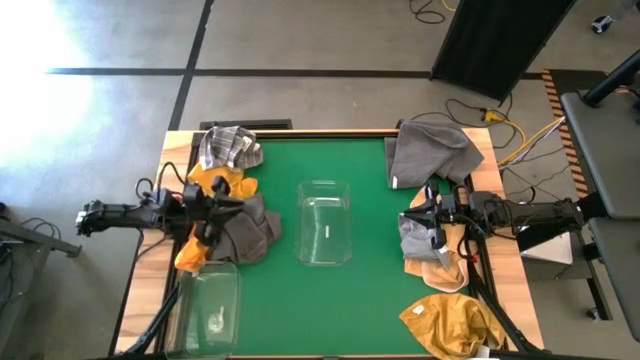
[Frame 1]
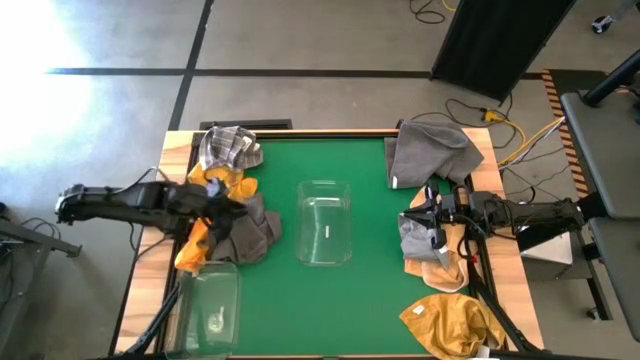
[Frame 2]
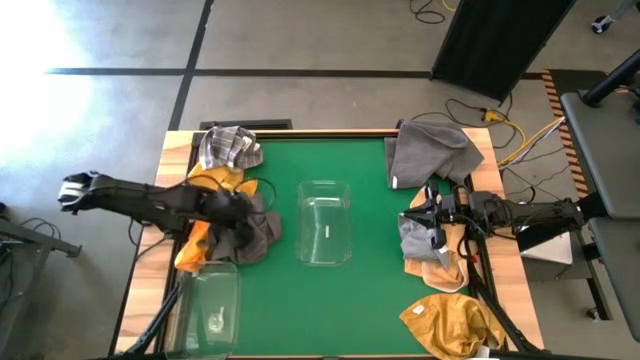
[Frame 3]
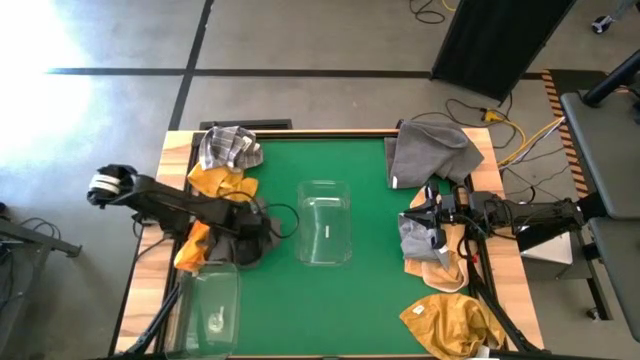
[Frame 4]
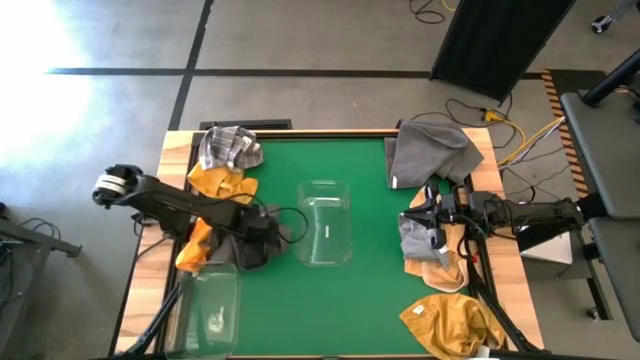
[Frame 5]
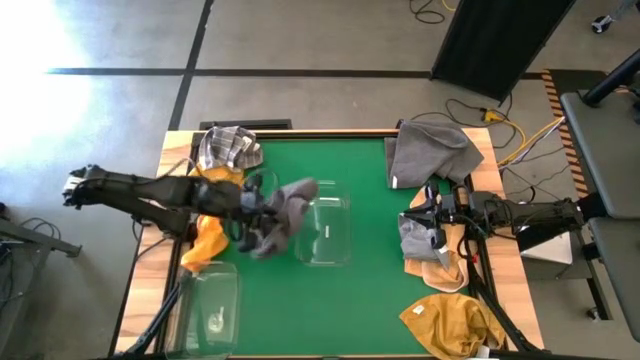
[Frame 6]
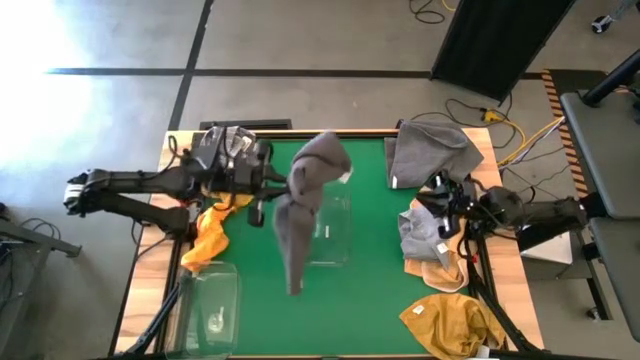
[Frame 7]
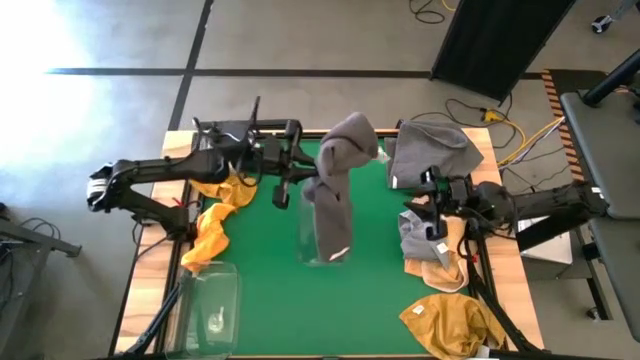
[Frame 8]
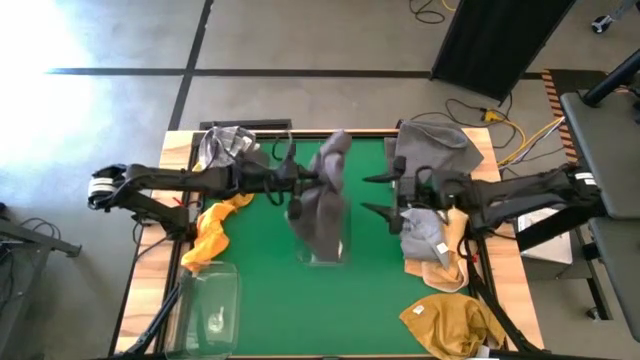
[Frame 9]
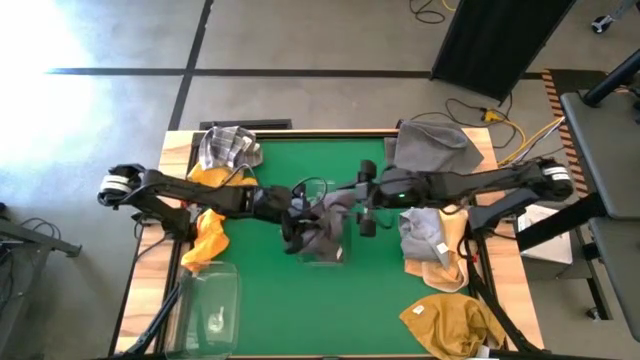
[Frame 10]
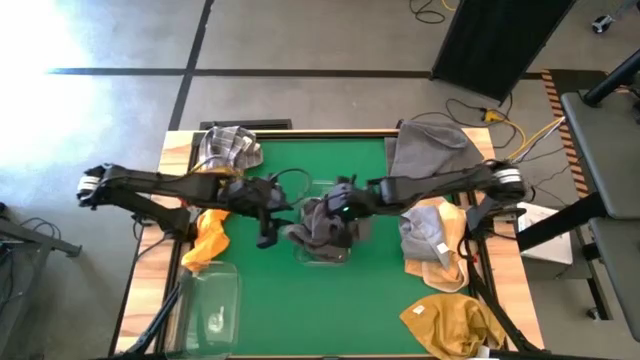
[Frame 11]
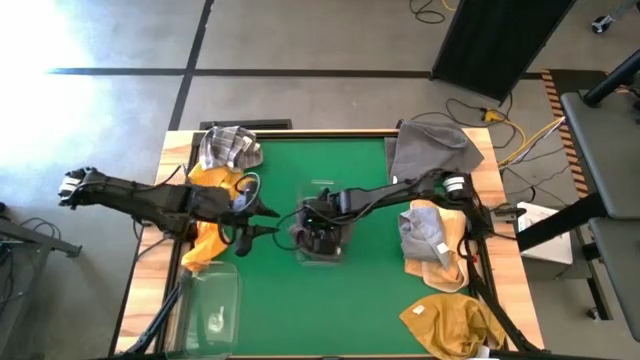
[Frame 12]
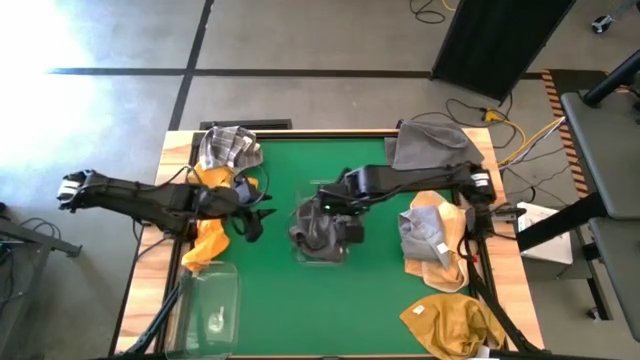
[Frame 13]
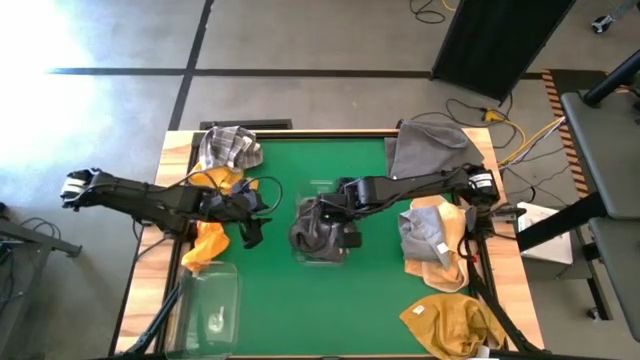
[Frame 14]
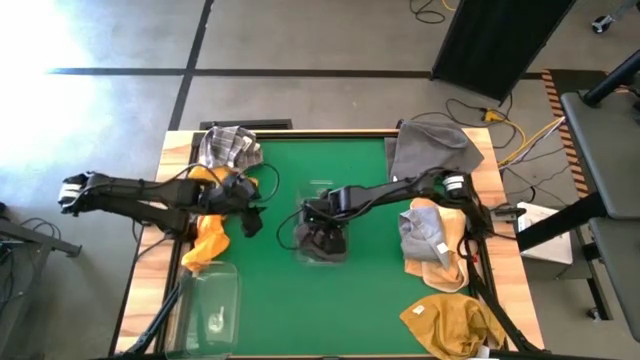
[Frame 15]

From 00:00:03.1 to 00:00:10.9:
Task: Sort towels by color in basket
Put the bottom gray towel into the top transparent bin

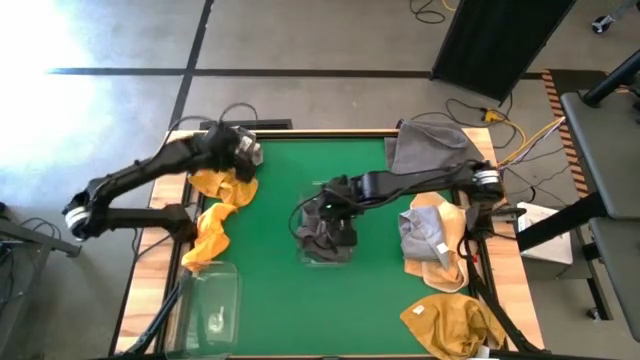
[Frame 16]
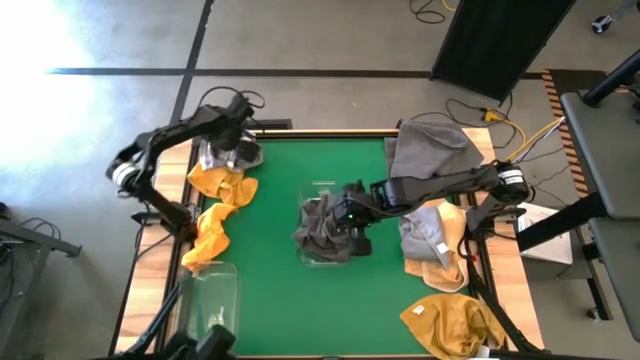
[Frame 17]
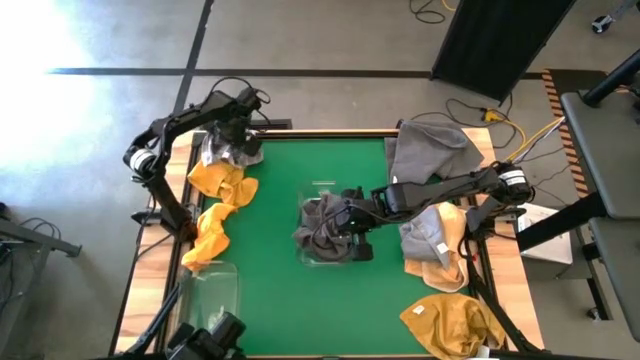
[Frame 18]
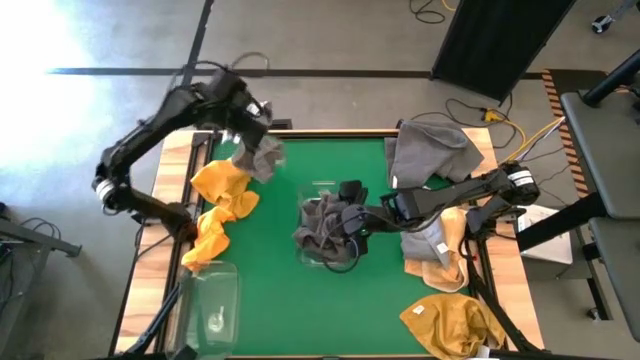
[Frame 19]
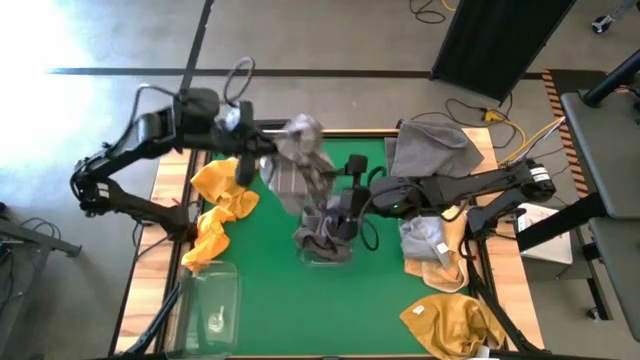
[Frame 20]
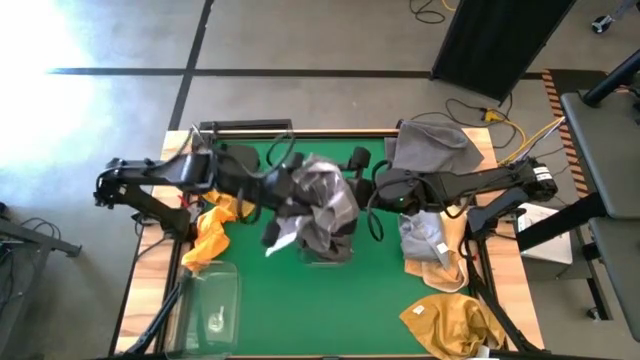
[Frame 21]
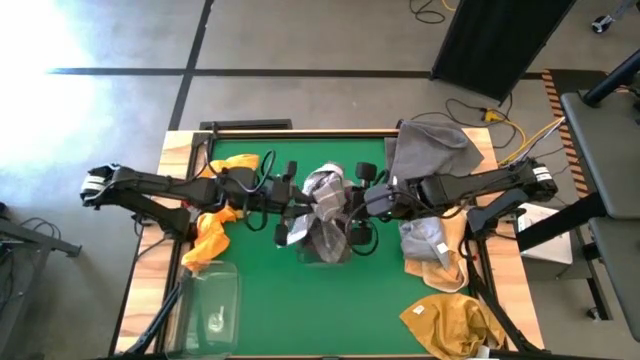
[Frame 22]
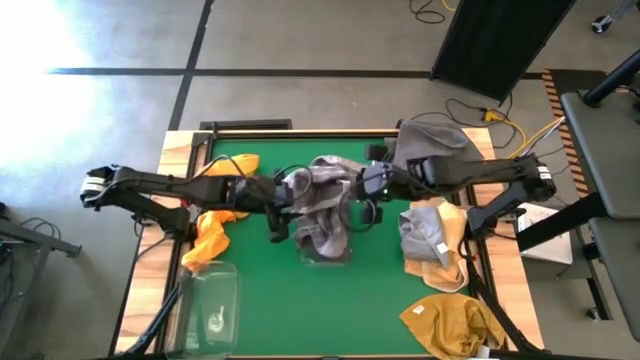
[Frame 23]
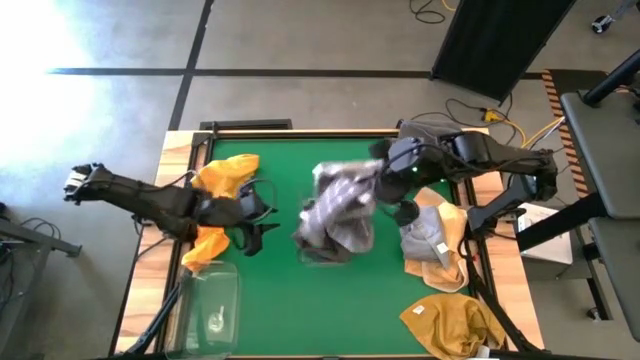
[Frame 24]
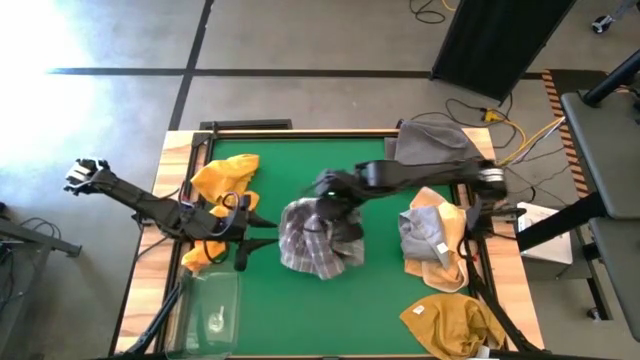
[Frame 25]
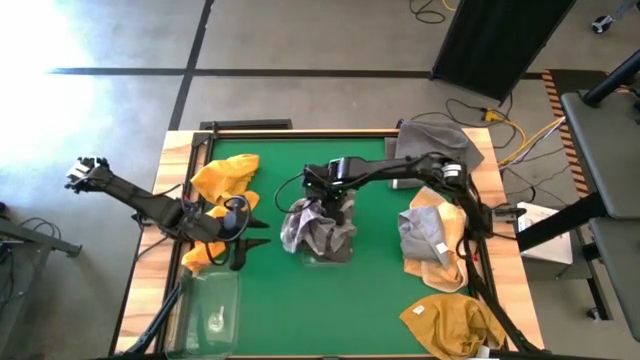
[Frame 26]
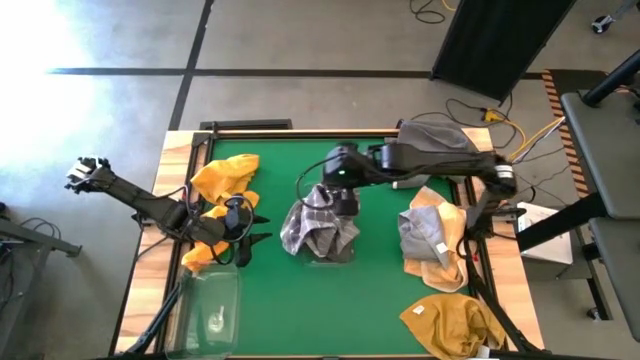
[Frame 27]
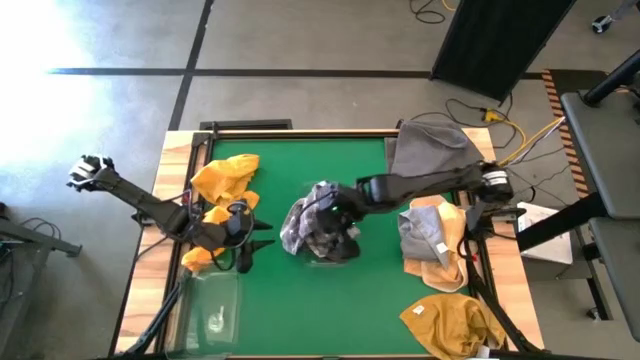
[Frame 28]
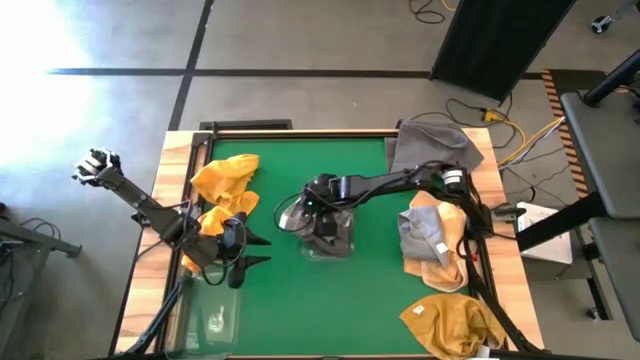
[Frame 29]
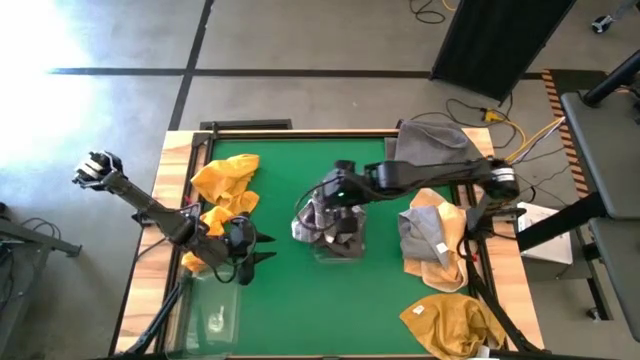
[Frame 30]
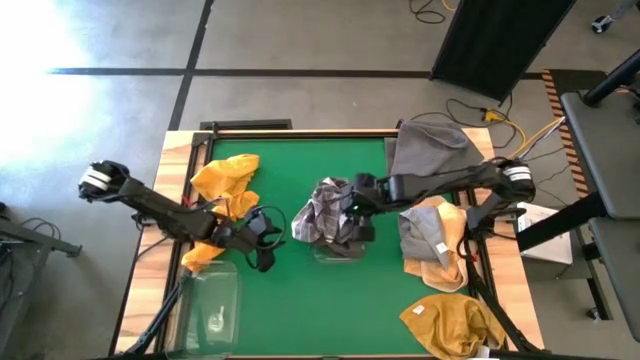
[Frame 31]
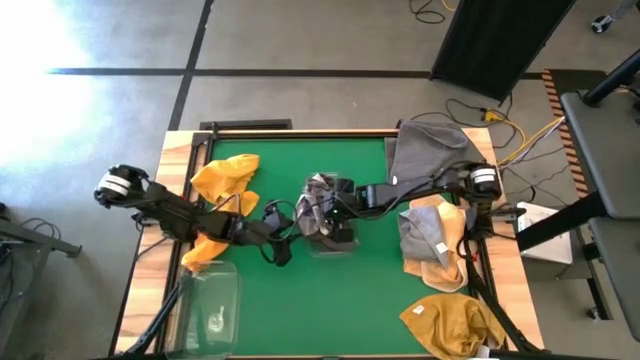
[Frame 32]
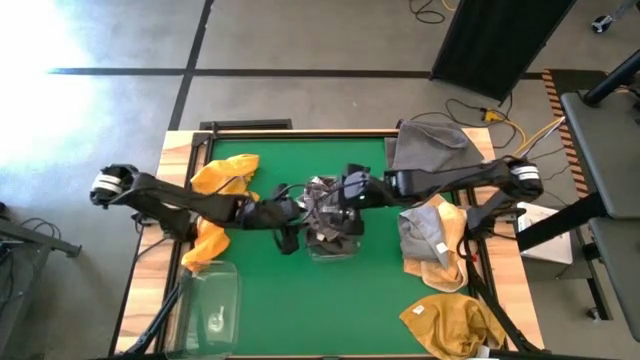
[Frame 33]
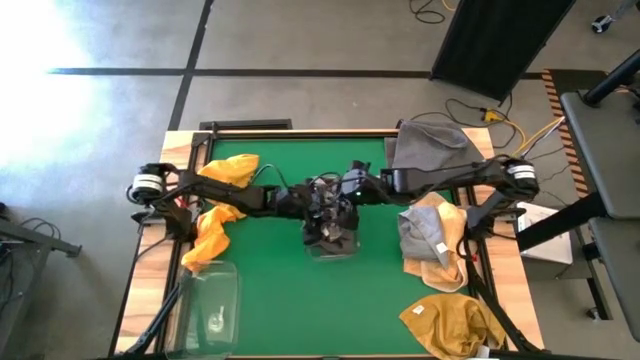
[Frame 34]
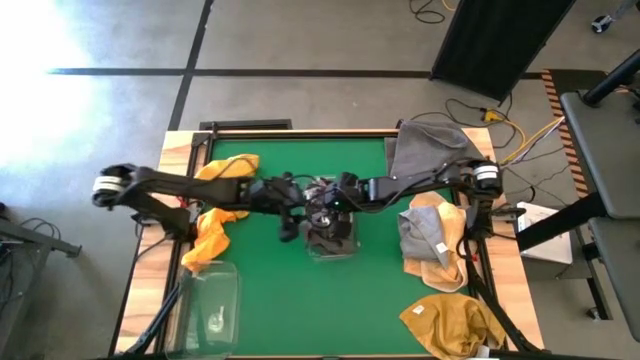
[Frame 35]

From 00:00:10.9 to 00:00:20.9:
Put the gray checkered towel into the top transparent bin

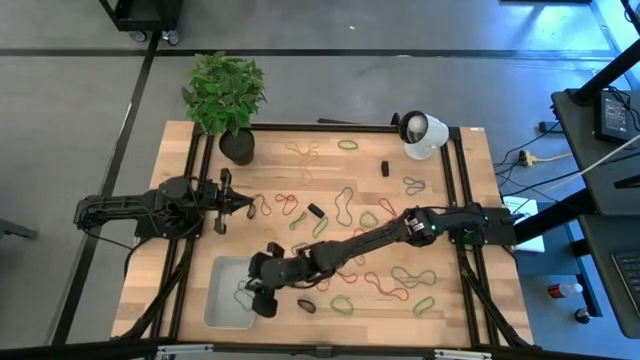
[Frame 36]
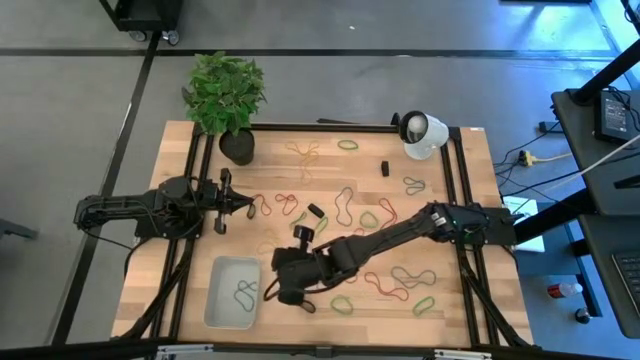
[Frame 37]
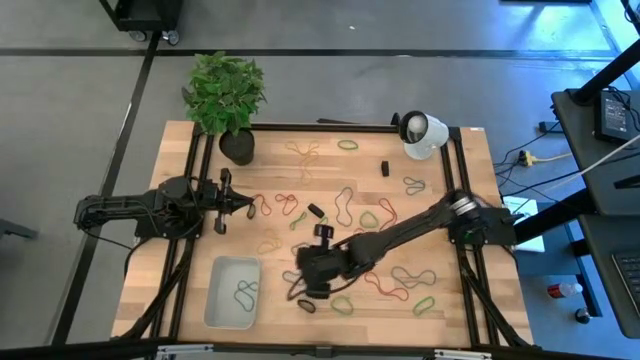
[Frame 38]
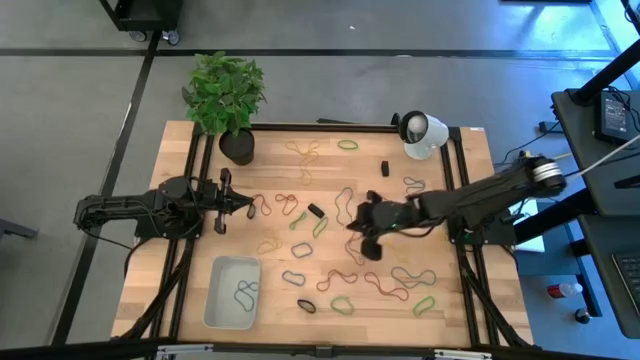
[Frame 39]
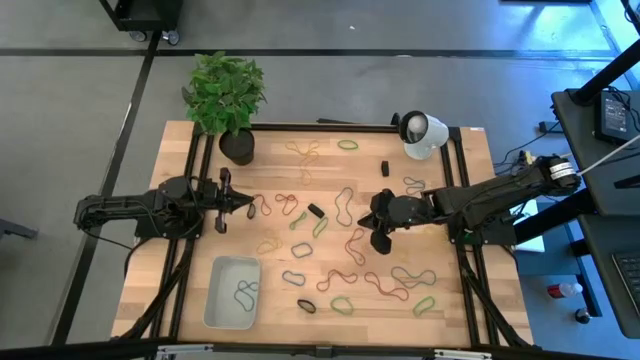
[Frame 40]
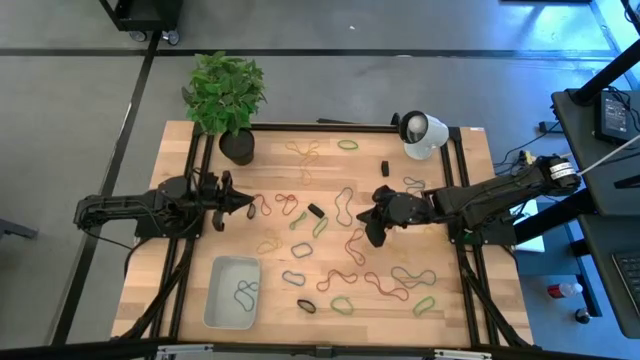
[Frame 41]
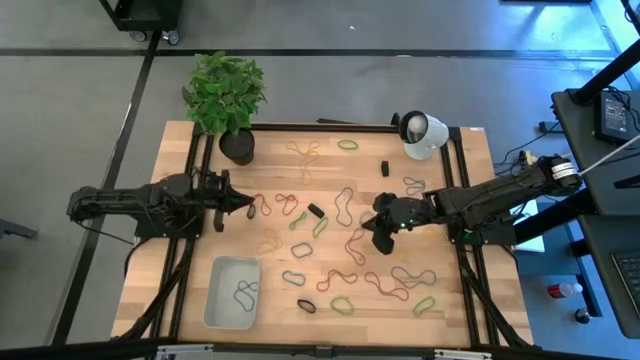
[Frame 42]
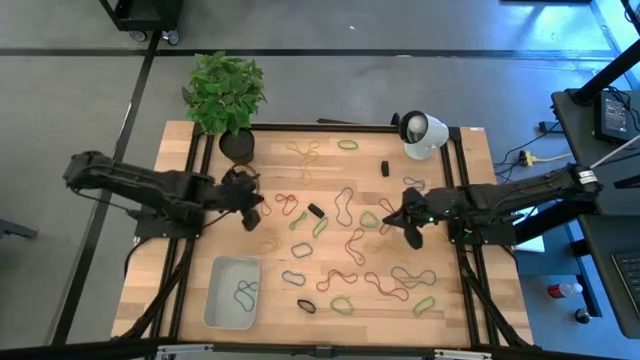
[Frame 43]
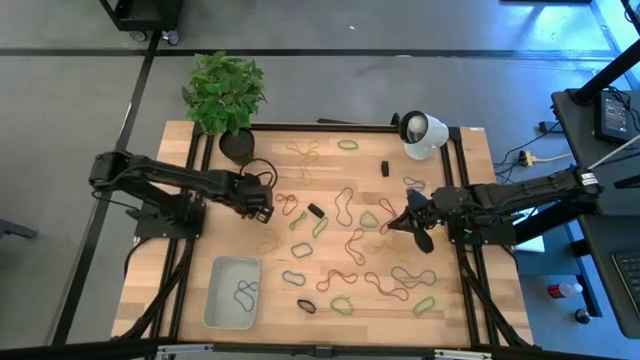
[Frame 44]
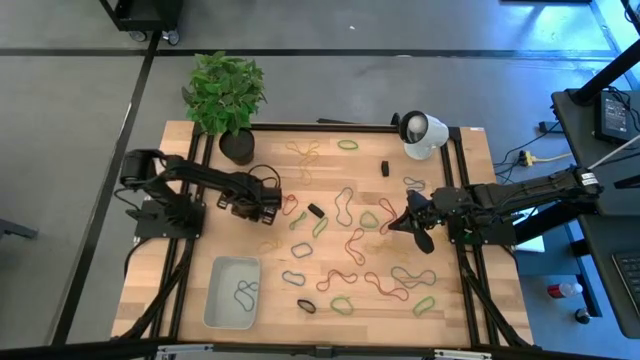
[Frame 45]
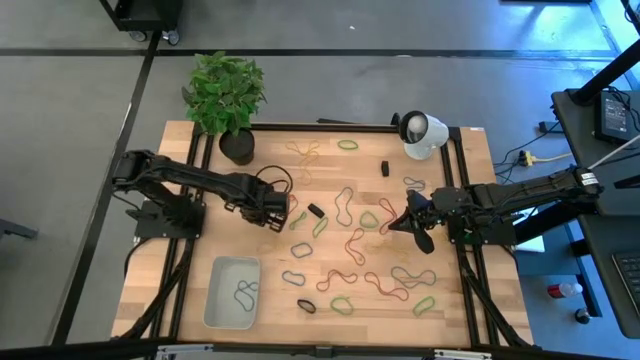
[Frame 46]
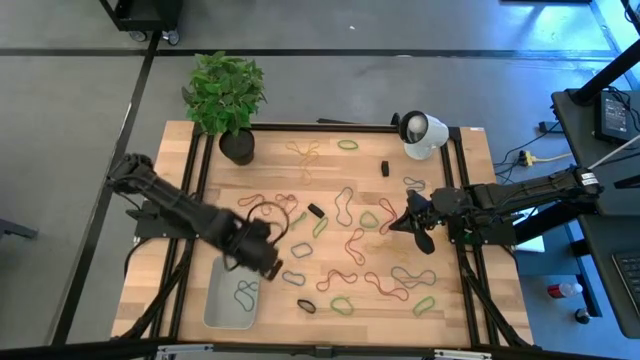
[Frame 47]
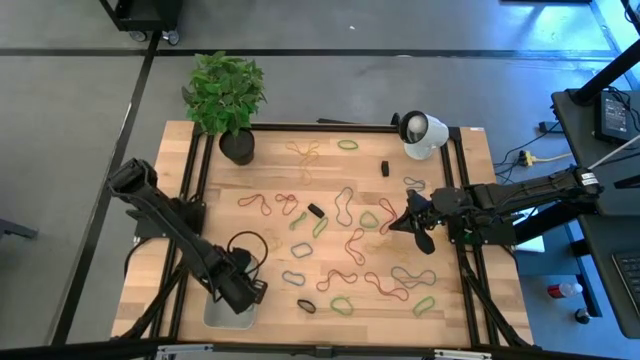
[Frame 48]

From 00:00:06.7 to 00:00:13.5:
Task: Pick and place rubber bands into bin
Put the black rubber band into the bin
